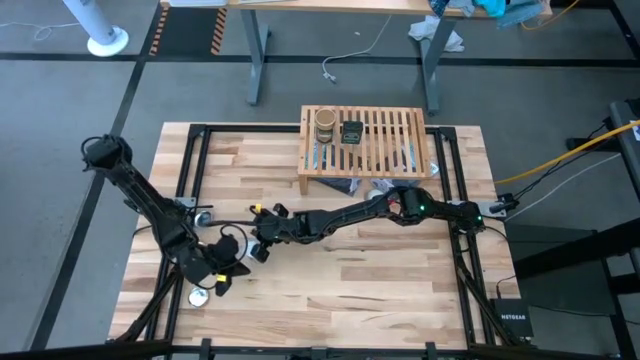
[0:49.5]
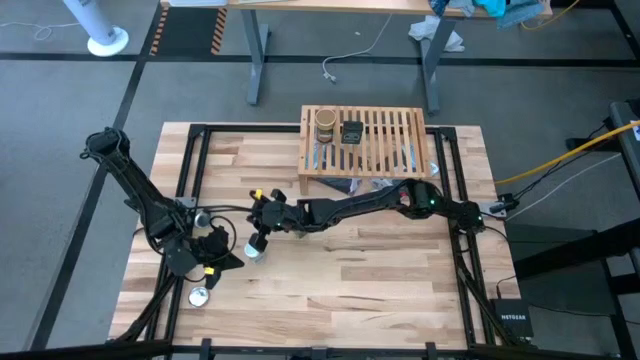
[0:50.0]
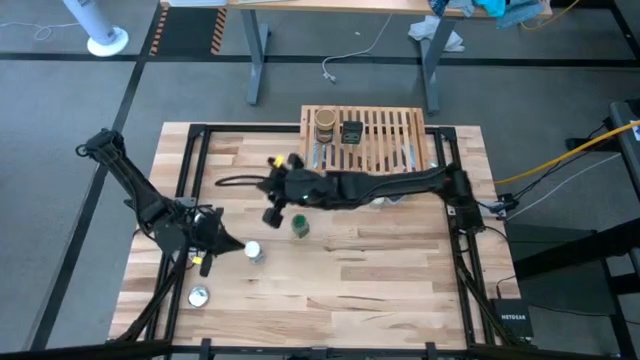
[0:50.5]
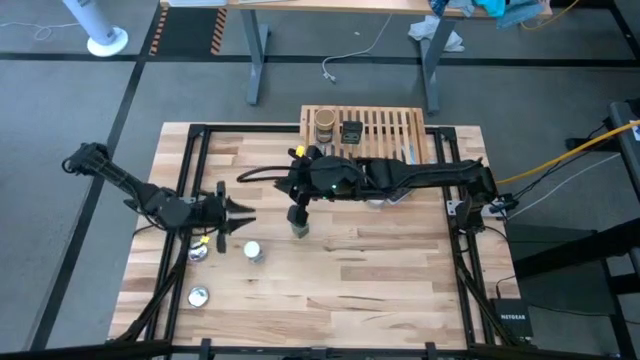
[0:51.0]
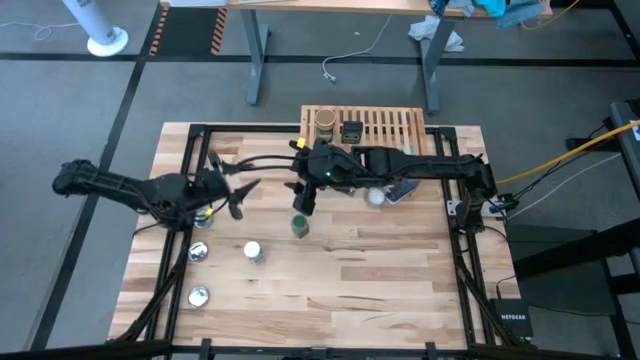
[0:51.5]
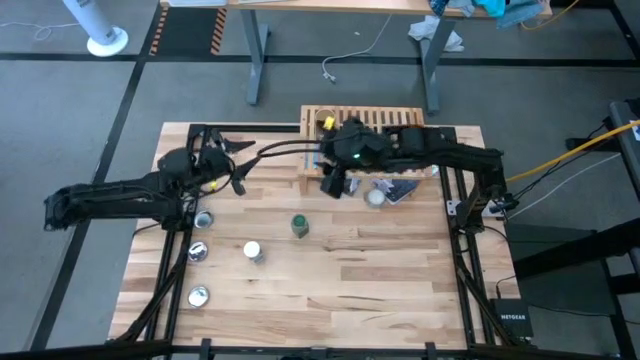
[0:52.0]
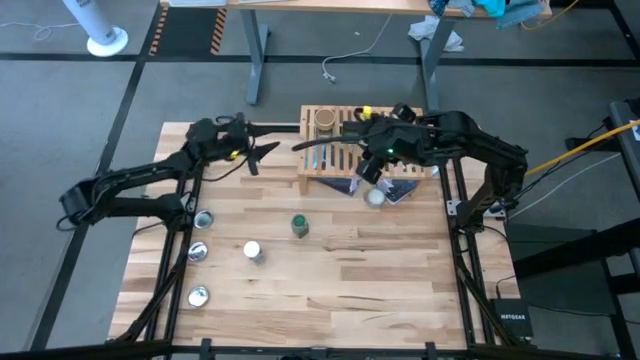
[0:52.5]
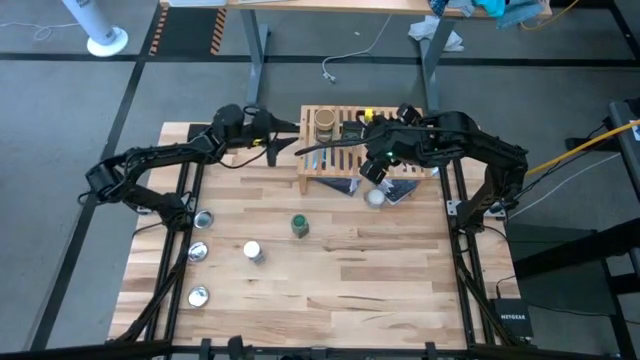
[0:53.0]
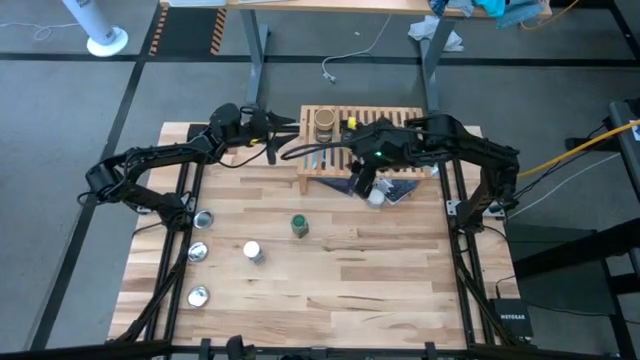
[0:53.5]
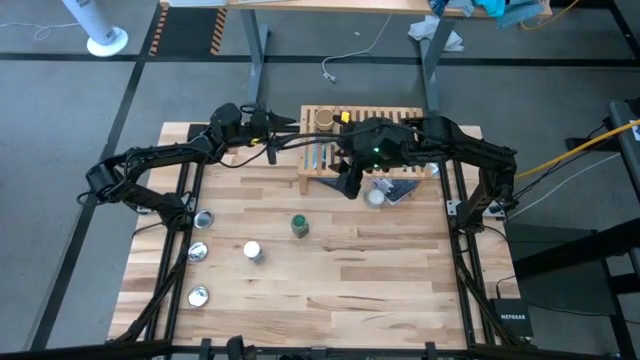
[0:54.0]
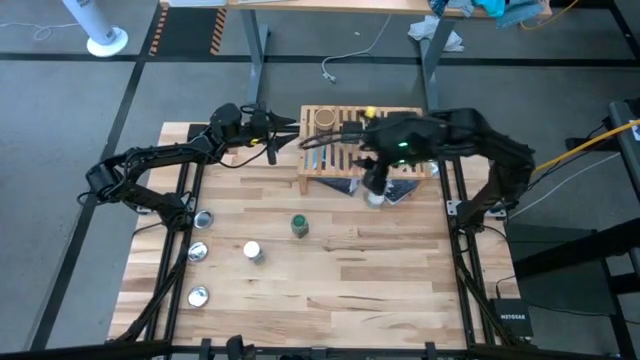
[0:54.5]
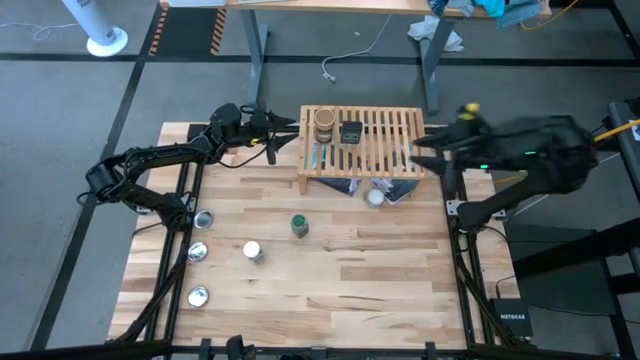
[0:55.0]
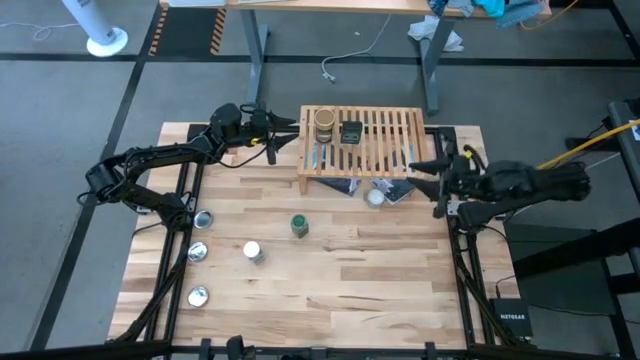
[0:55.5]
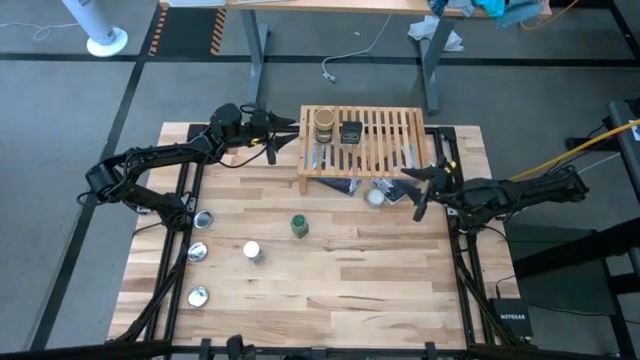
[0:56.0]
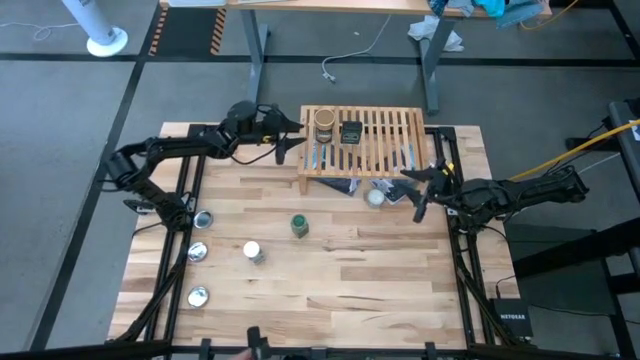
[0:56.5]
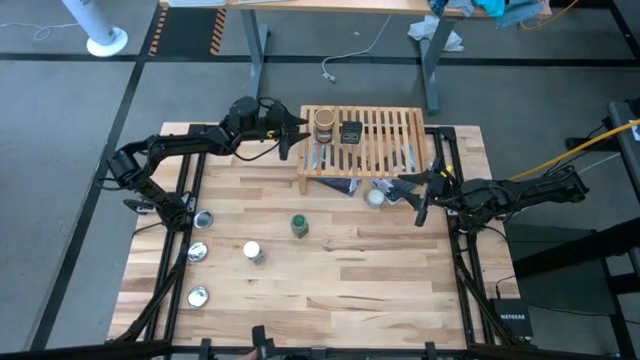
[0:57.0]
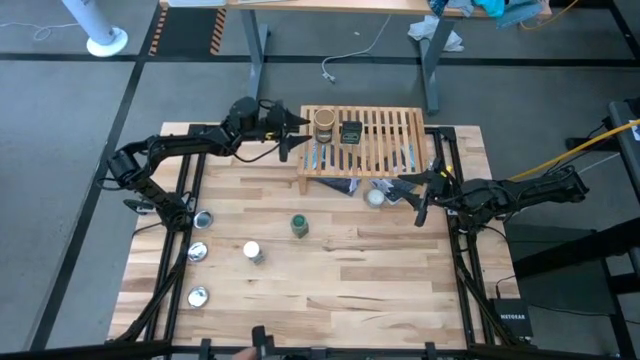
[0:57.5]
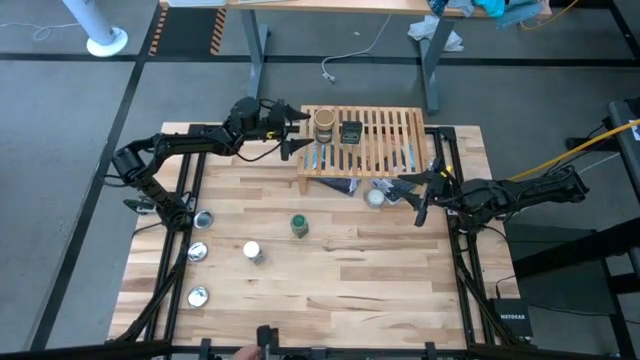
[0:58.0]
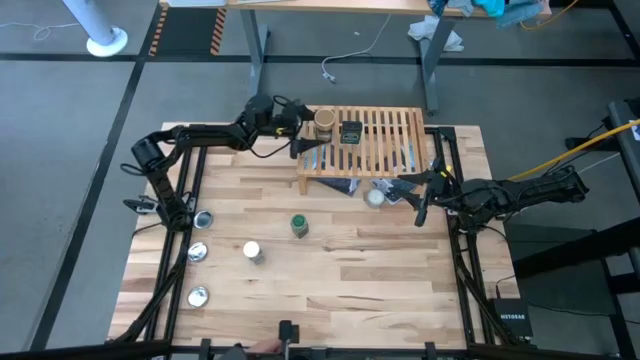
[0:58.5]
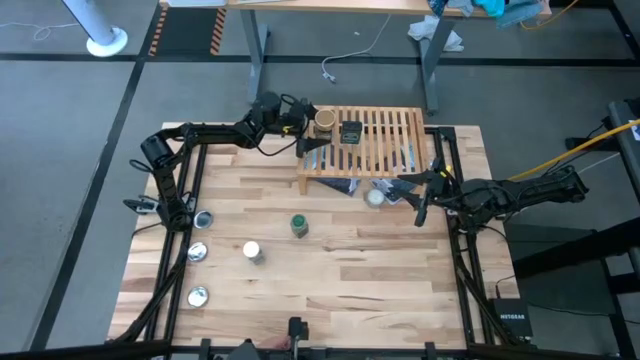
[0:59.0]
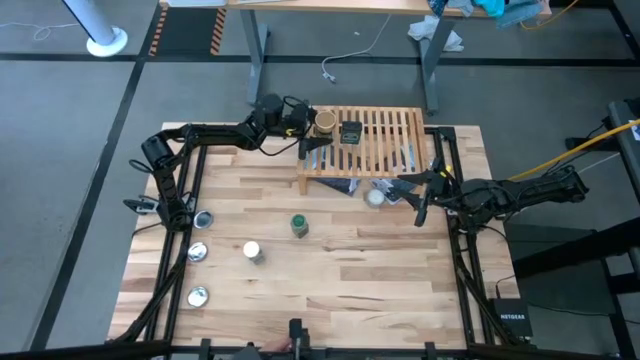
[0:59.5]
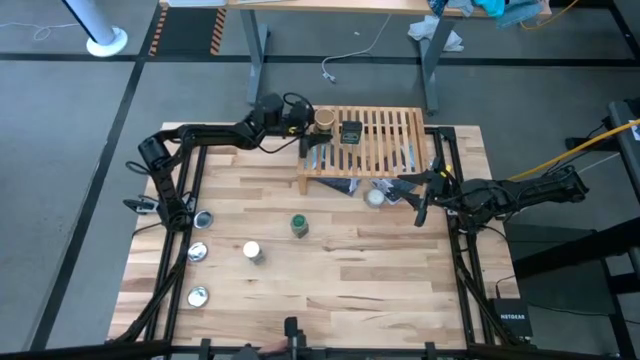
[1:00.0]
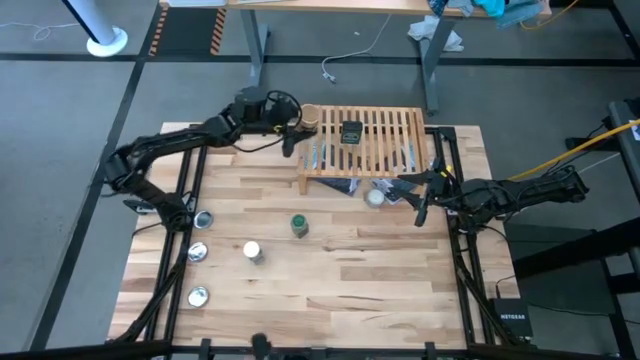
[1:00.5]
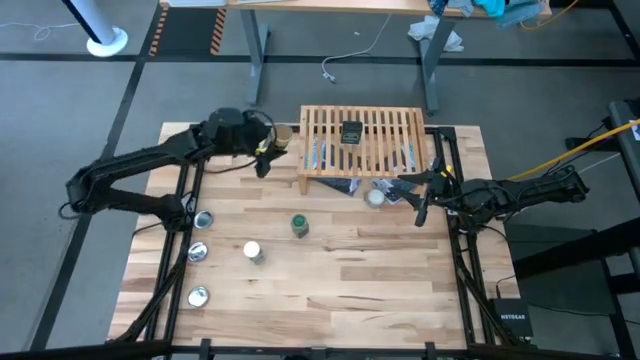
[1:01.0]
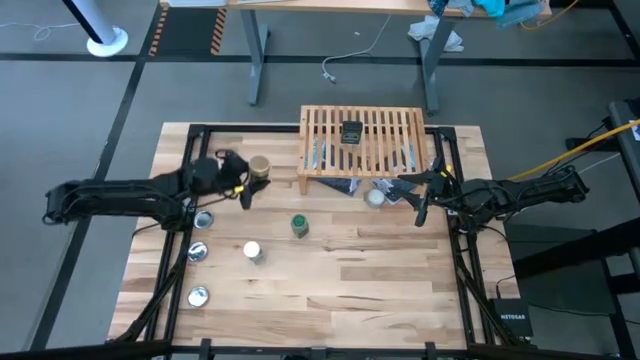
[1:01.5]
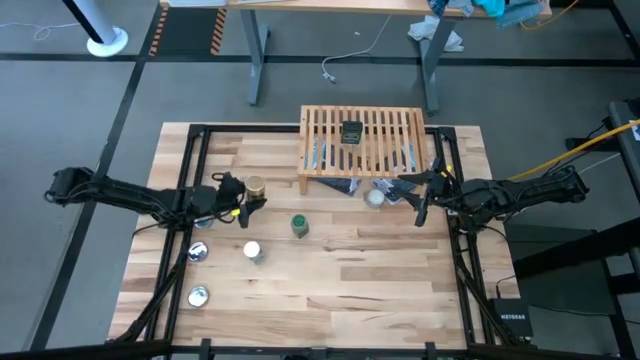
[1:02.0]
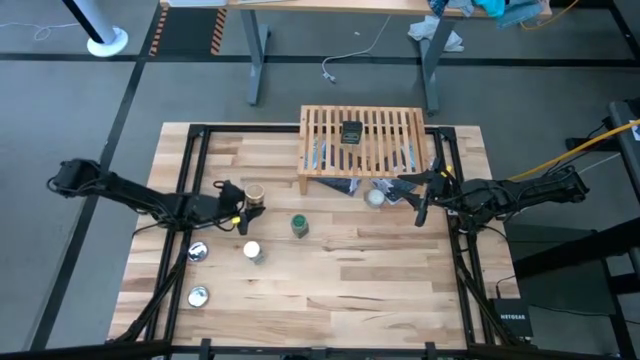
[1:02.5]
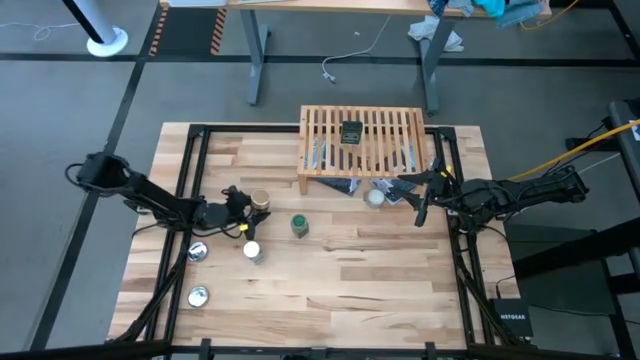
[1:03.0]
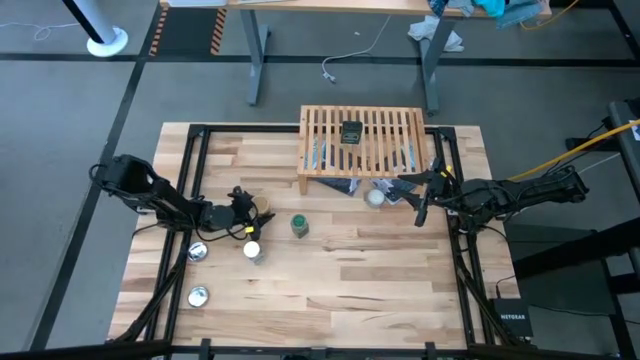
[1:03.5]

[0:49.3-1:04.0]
Task: Shelf spices
Remove the gold seasoning bottle from the shelf

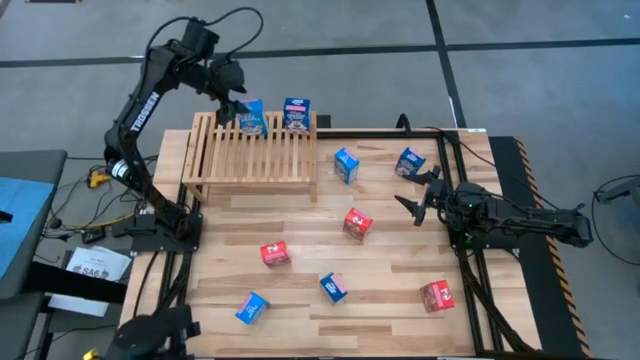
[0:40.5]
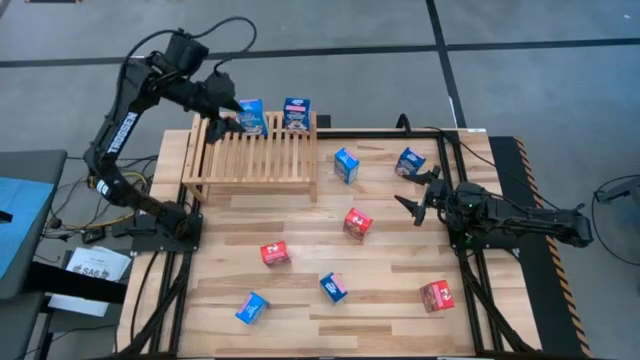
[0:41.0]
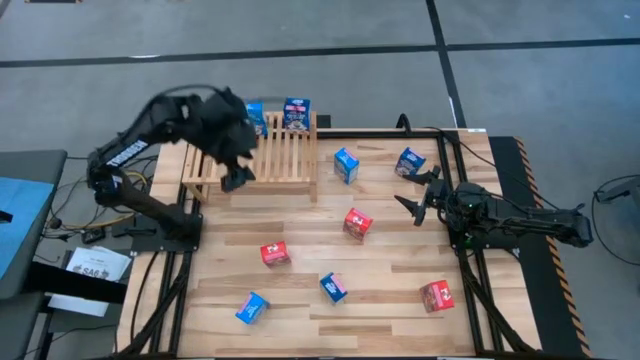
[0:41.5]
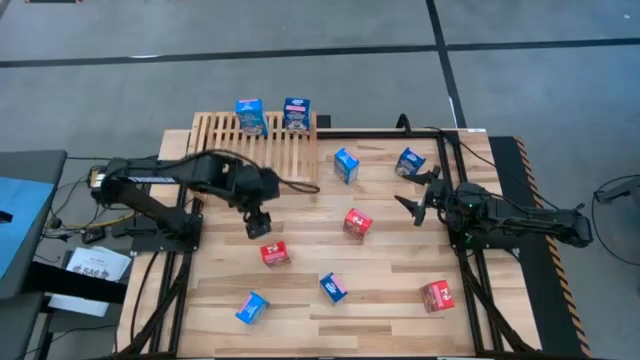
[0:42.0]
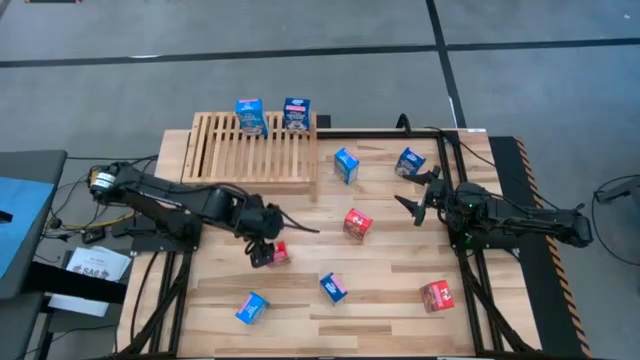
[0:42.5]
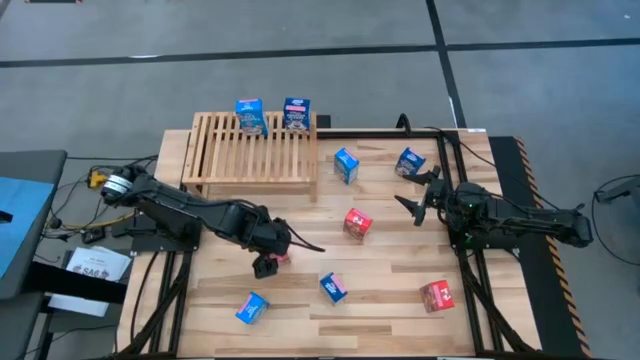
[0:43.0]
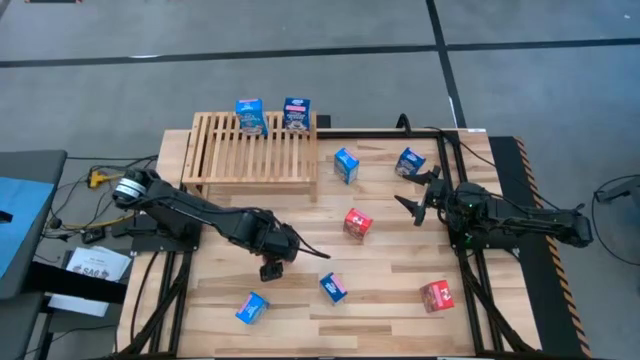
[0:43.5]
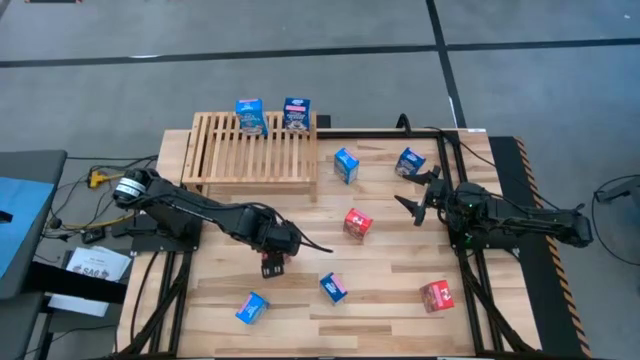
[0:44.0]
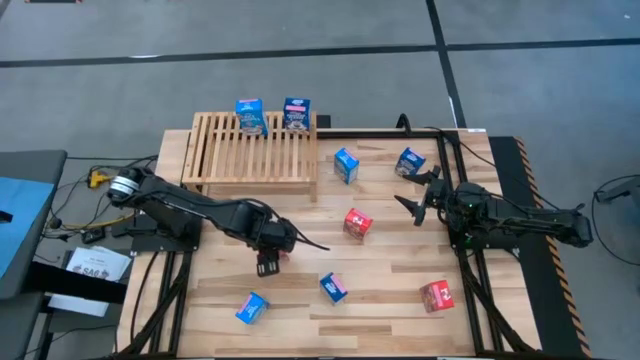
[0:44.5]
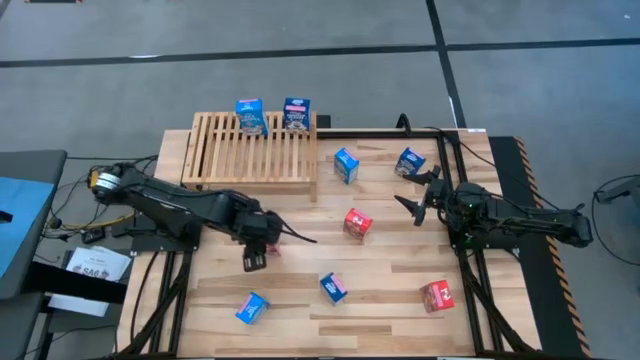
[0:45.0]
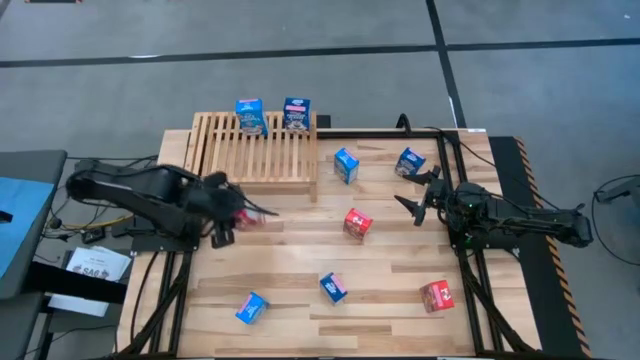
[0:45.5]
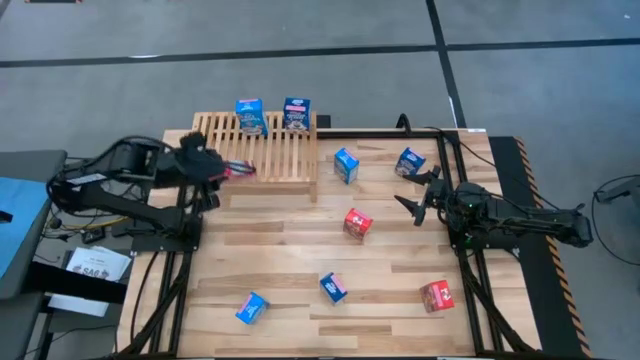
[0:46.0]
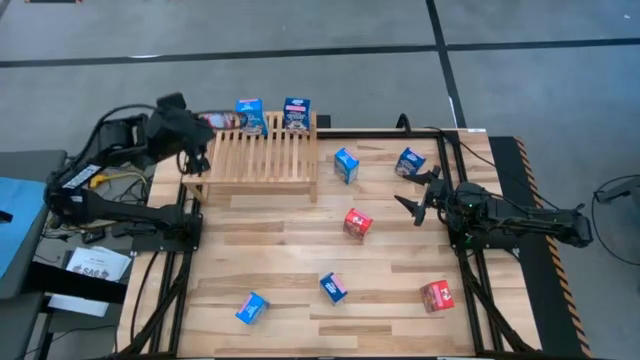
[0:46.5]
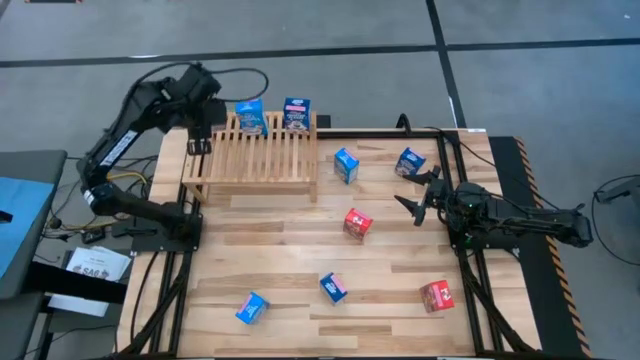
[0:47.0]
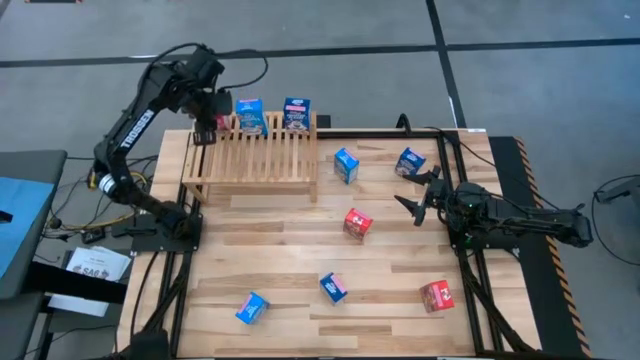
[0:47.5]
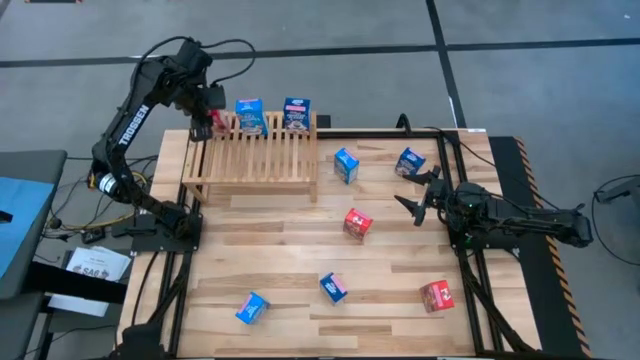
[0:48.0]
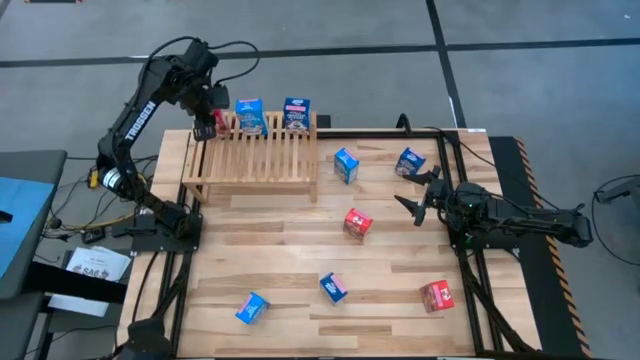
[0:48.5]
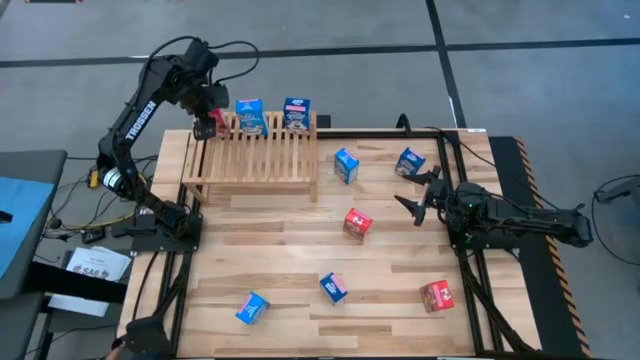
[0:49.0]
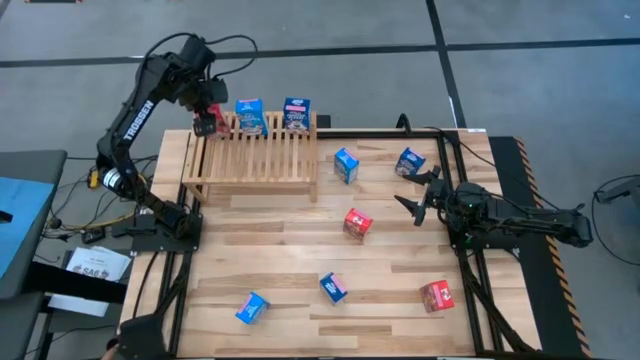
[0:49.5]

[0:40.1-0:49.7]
Task: Stack cereal on shelf
Put the left red cereal box on the shelf
